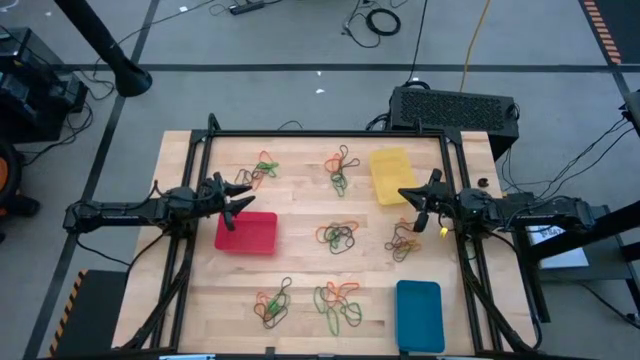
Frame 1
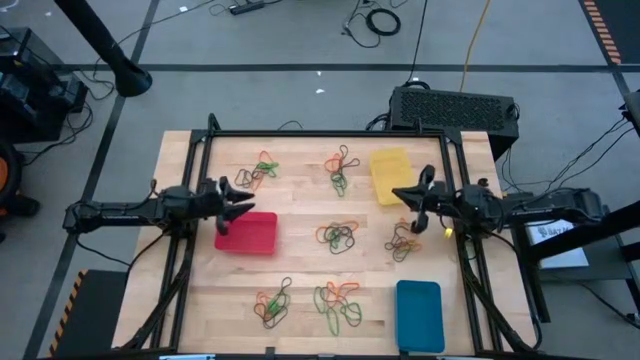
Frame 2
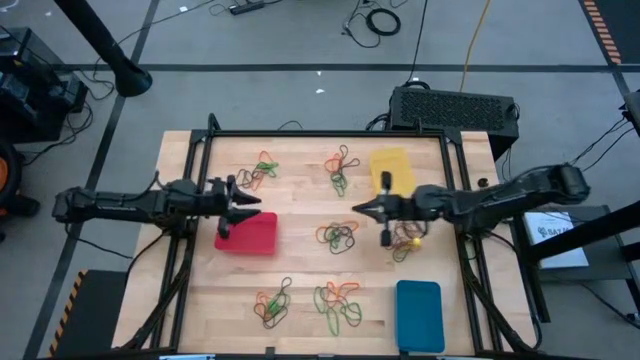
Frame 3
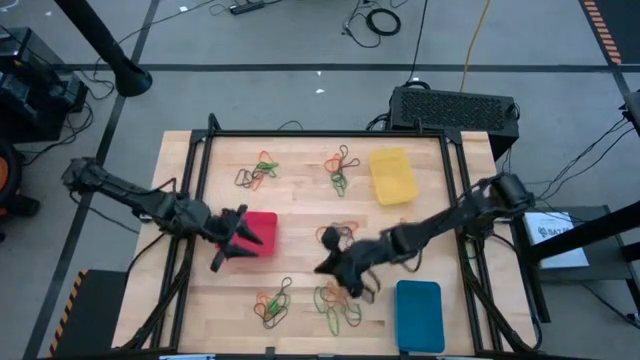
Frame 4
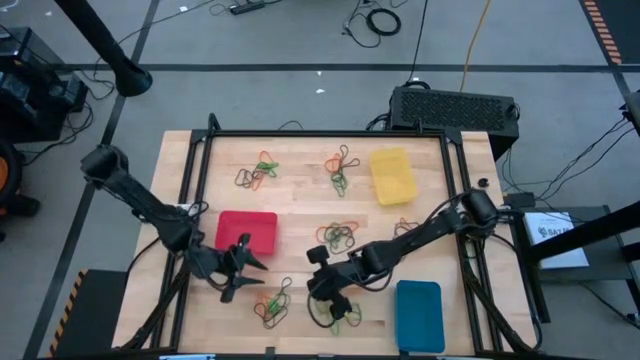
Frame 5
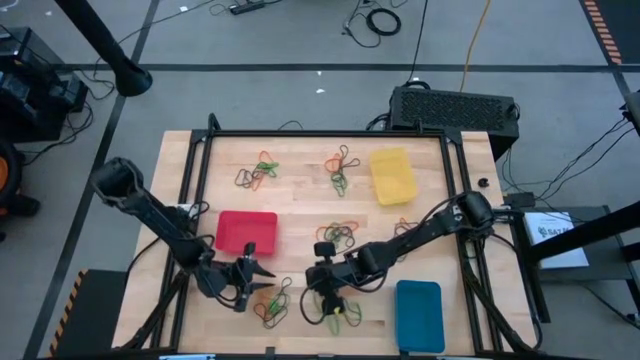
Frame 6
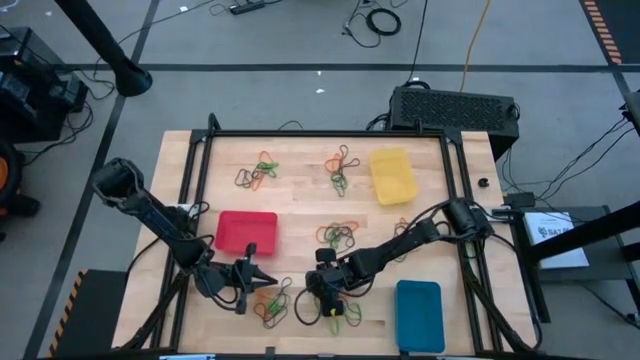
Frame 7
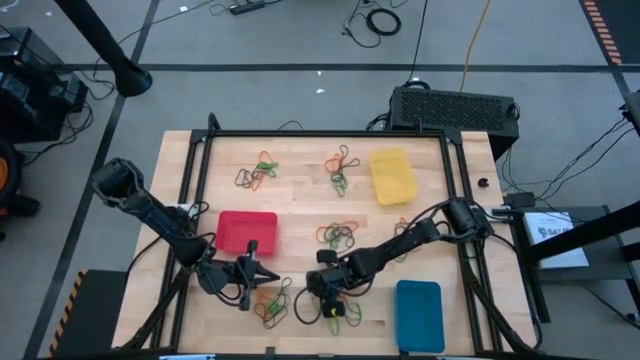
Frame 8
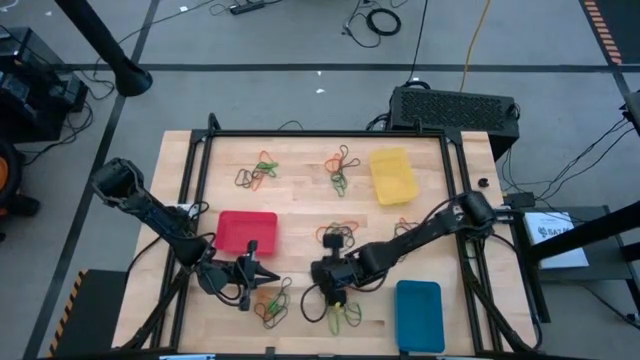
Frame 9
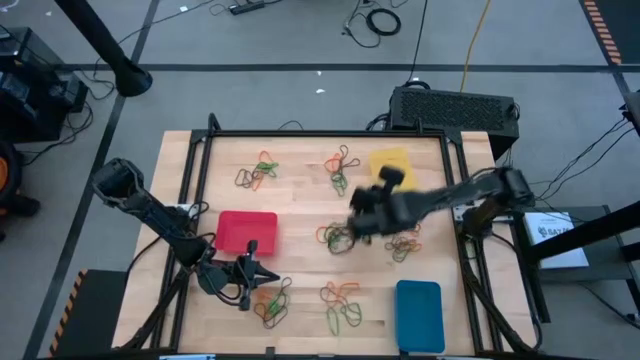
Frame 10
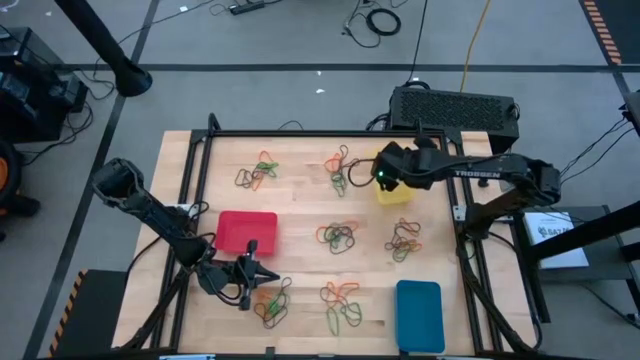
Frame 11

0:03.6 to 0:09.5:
Task: Sort rubber bands into baskets
Put the green rubber band into the yellow bin

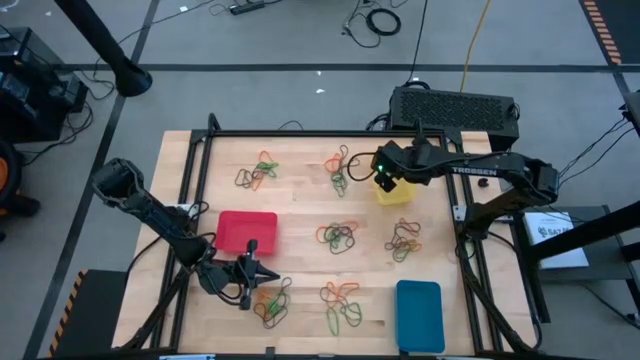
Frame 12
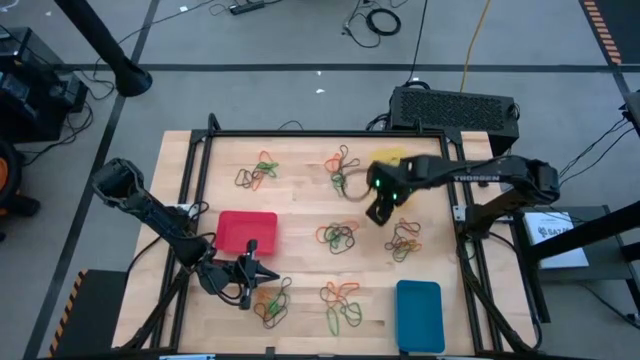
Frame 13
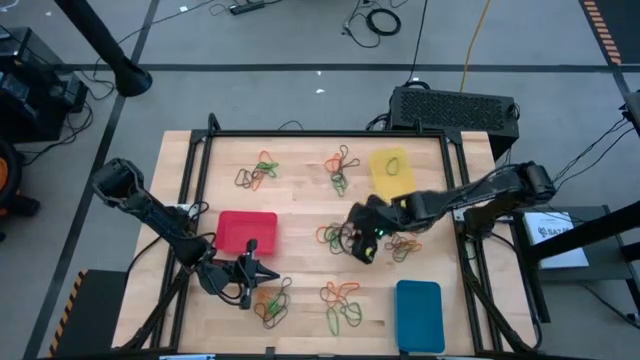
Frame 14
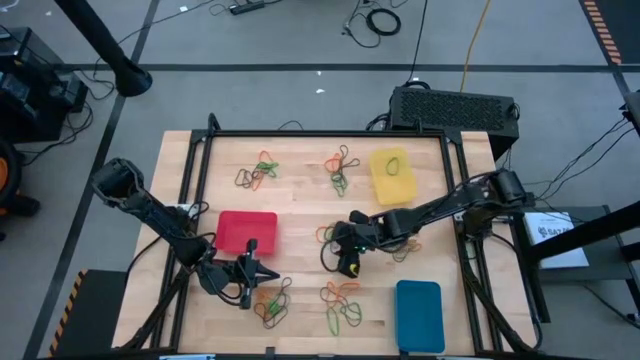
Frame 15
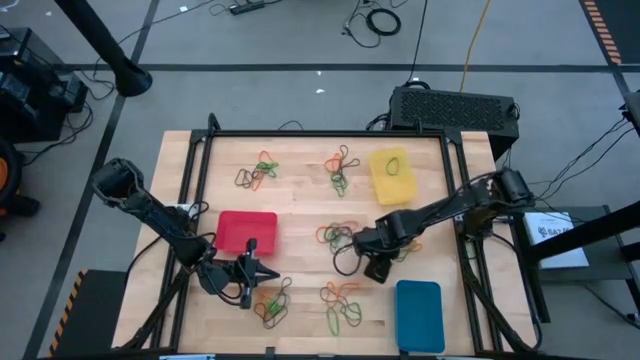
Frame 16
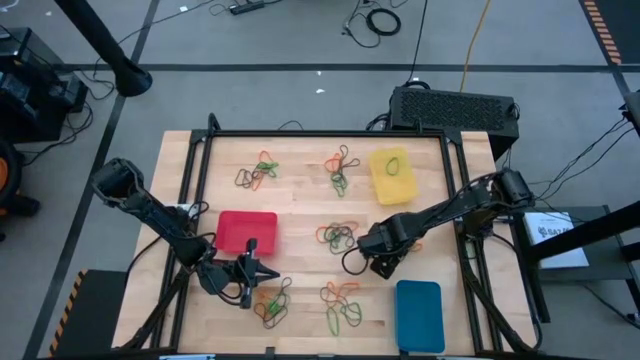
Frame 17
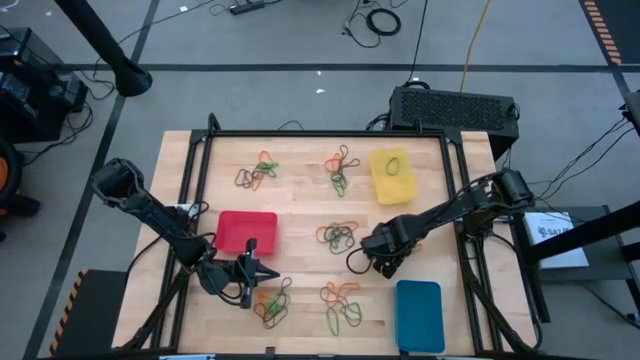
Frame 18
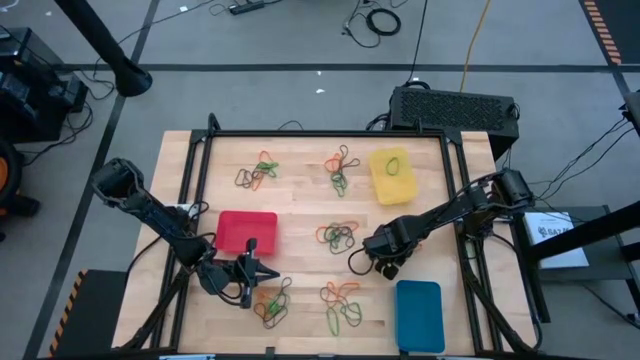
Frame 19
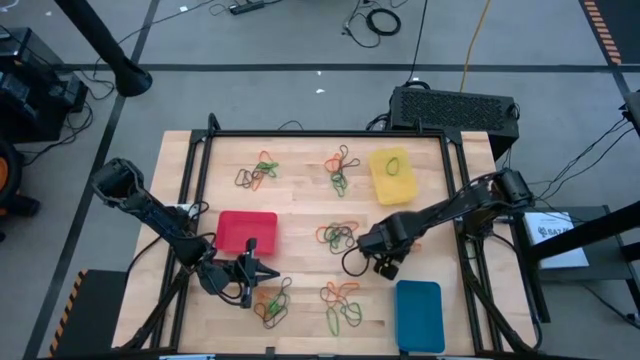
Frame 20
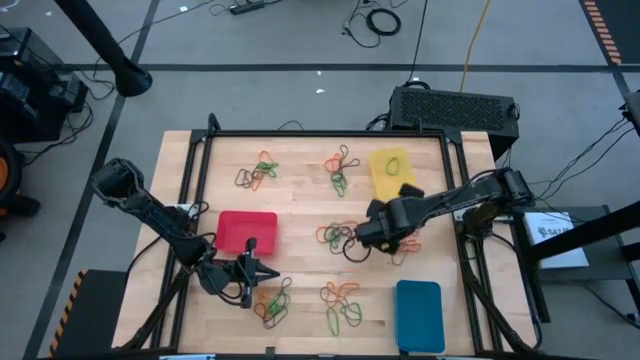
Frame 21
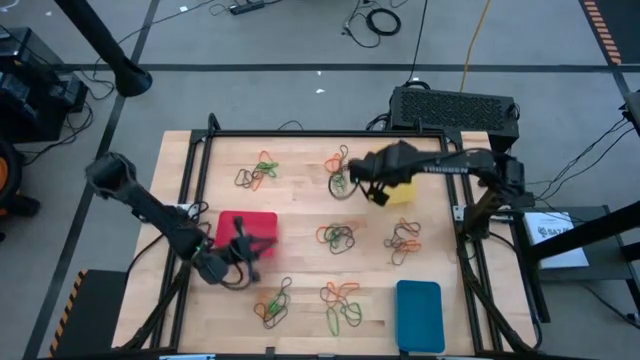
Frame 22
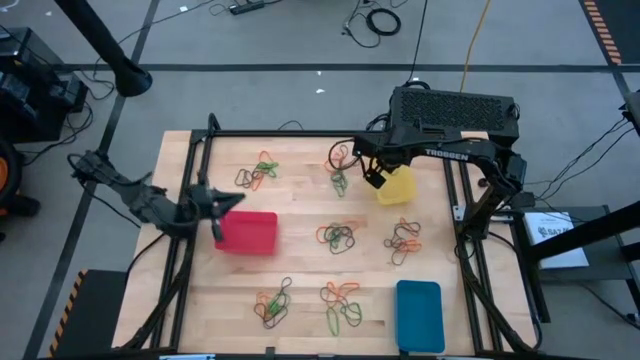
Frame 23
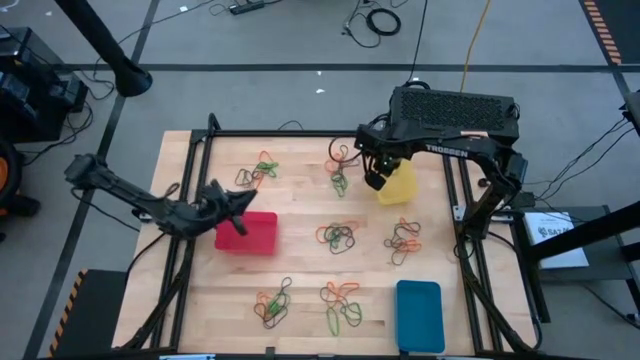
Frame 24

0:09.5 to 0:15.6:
Put the green rubber band into the yellow bin

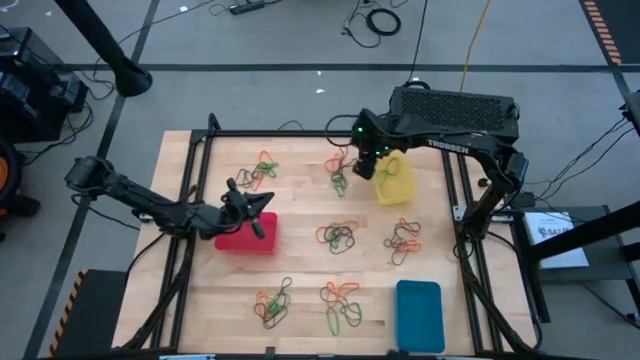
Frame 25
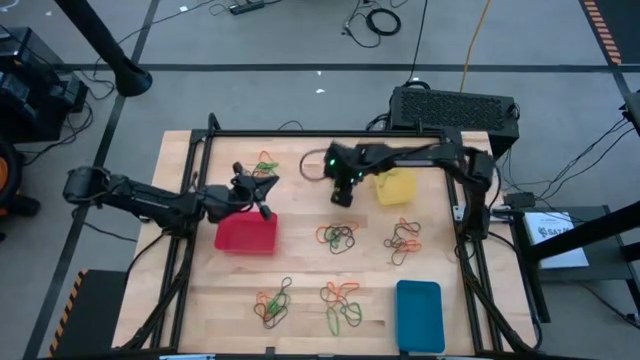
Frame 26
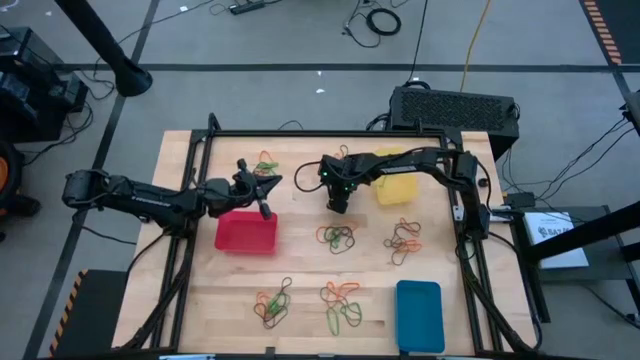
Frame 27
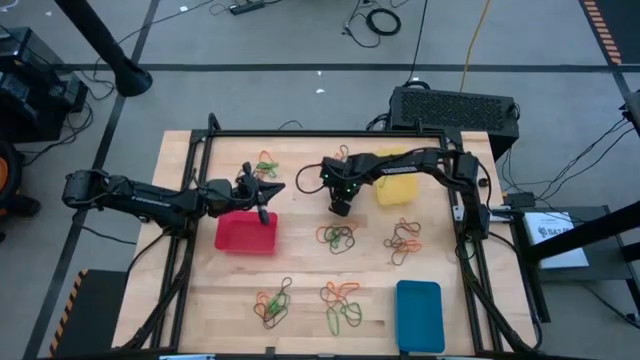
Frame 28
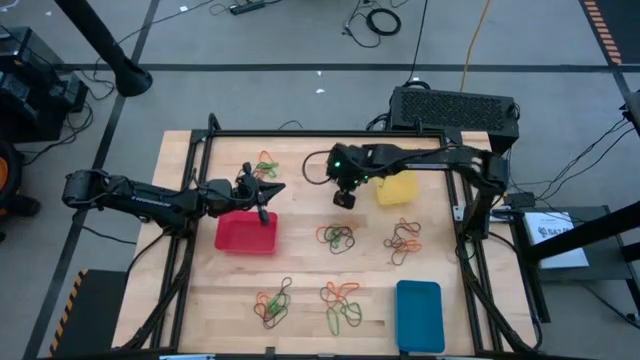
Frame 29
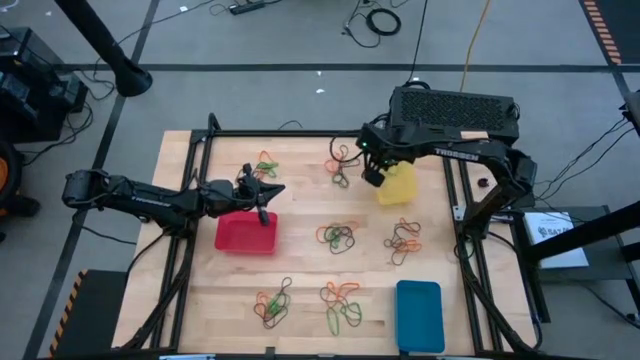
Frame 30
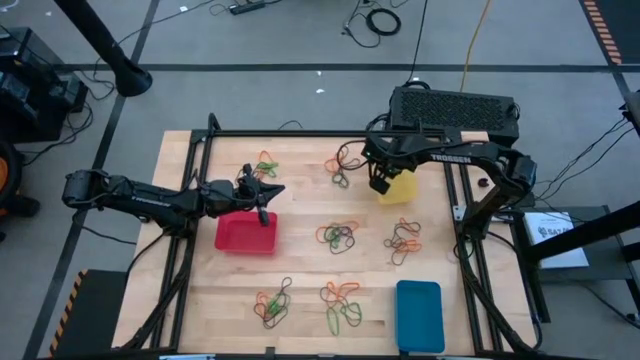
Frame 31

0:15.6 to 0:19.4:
Put the green rubber band into the yellow bin

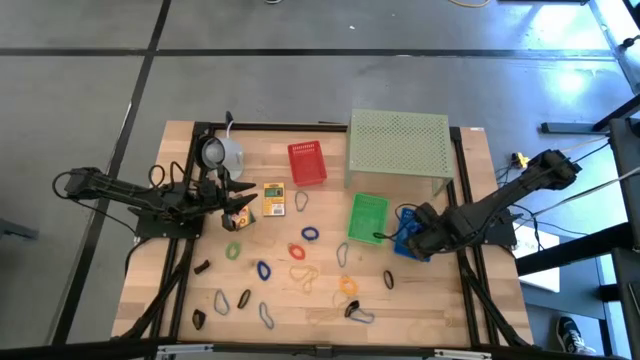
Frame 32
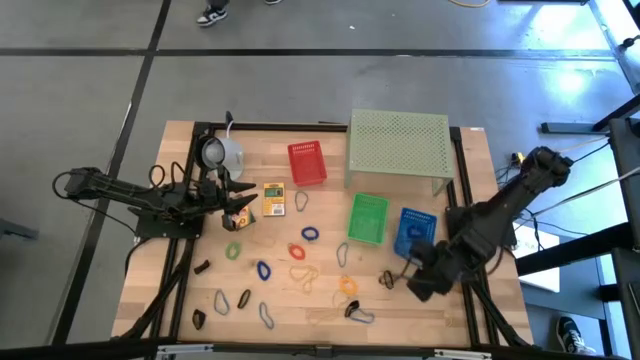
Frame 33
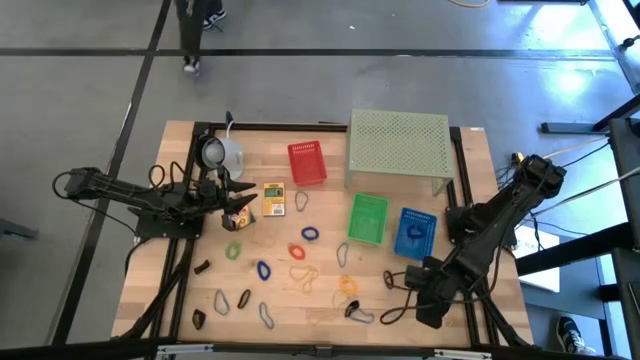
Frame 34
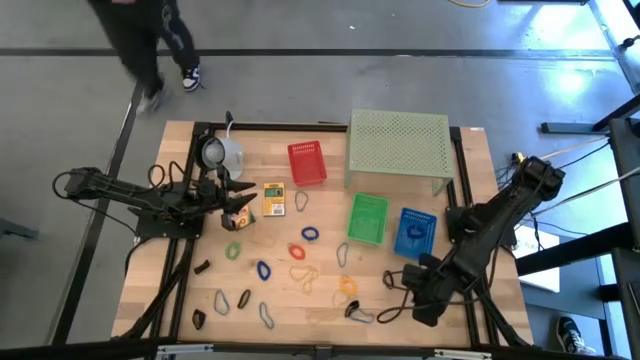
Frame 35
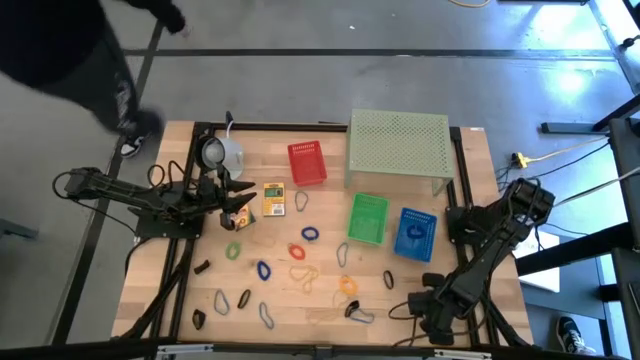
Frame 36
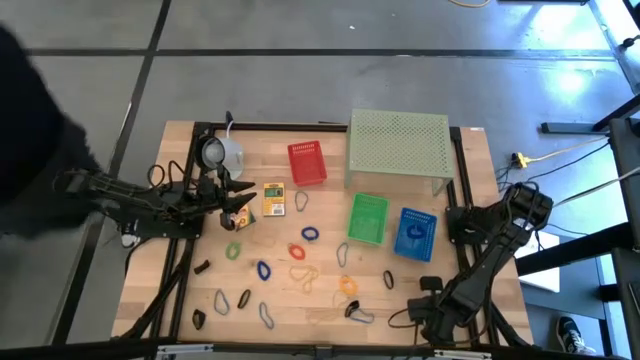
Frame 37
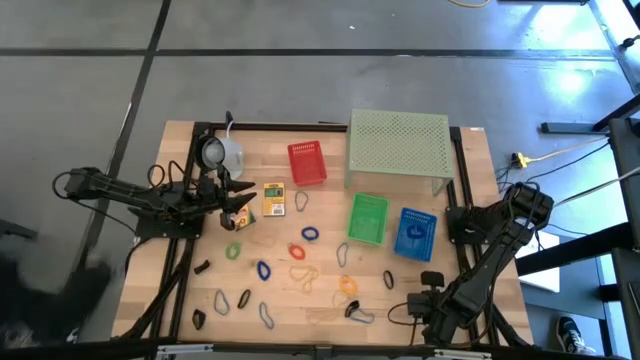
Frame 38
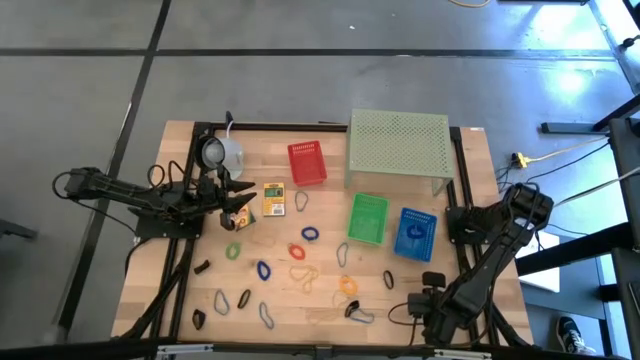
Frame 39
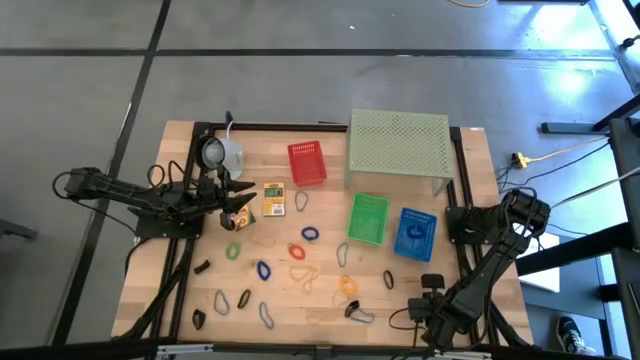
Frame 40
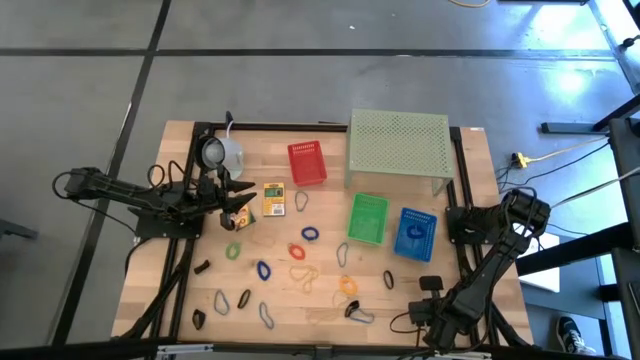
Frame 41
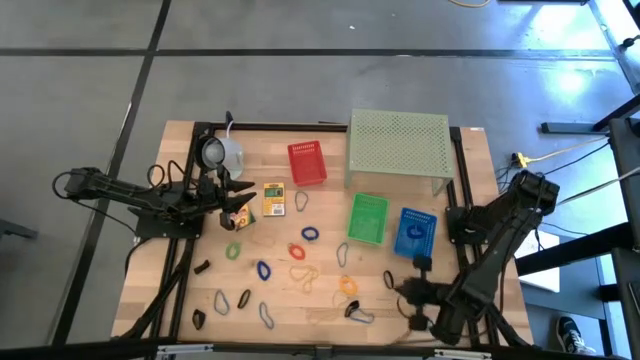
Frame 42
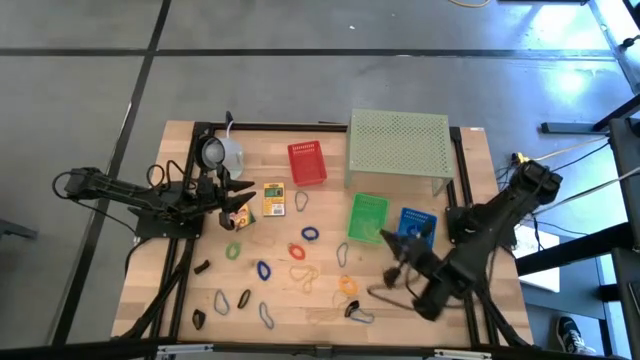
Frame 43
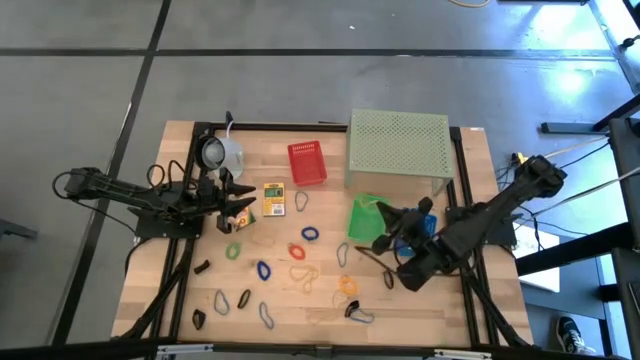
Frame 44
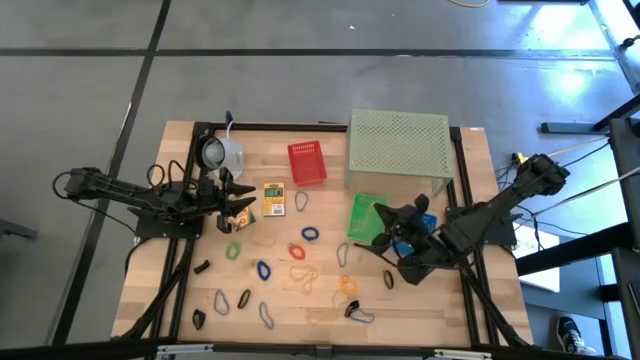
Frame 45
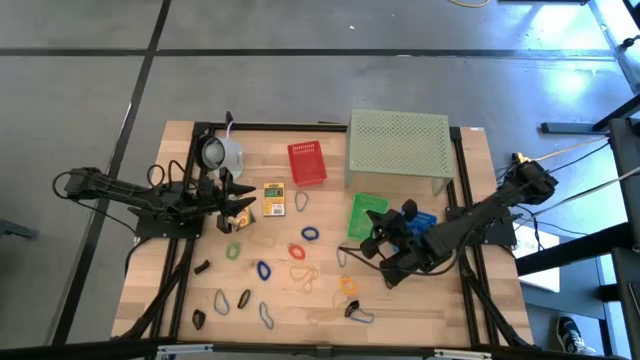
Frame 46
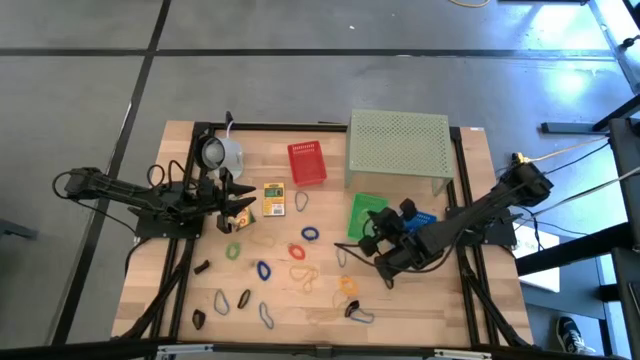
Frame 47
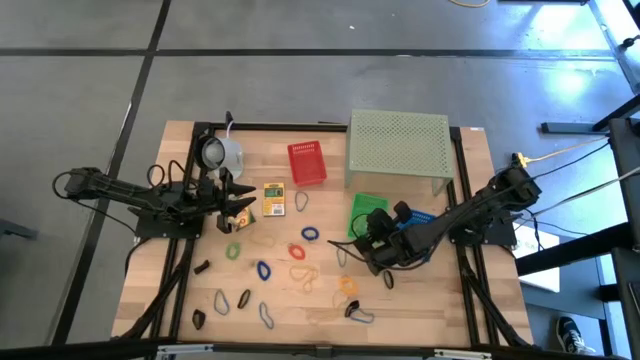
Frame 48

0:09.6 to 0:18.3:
Task: Pick & Place Office Desk Supplies
Put the yellow rubber band into the green bin
